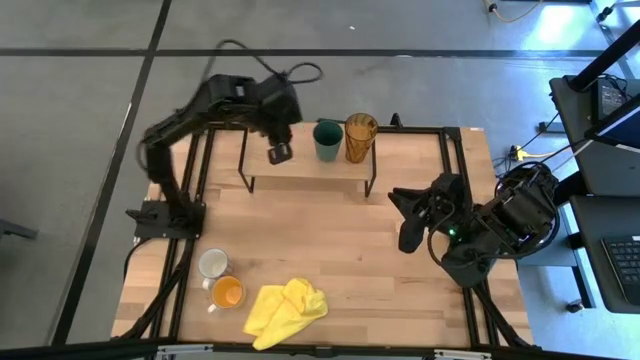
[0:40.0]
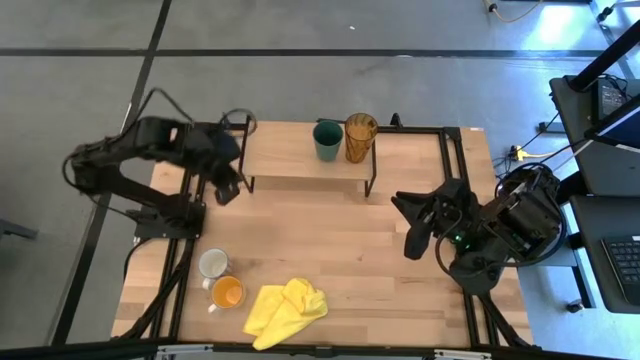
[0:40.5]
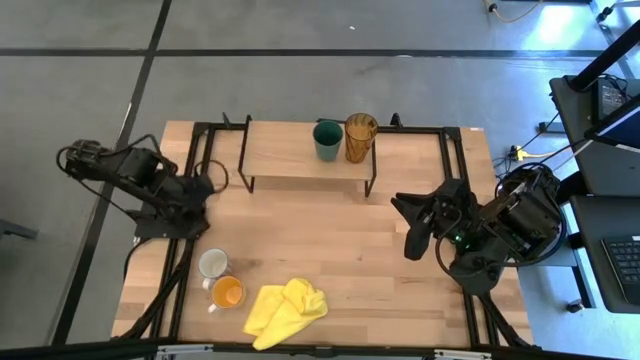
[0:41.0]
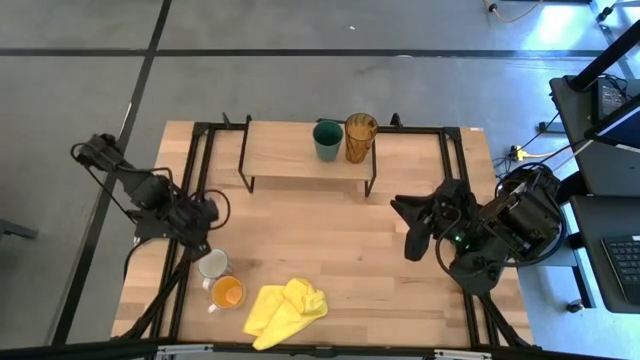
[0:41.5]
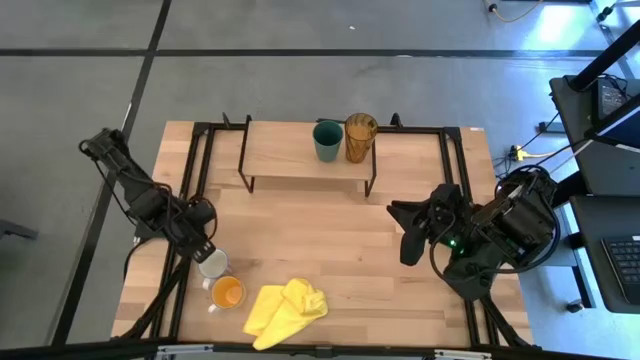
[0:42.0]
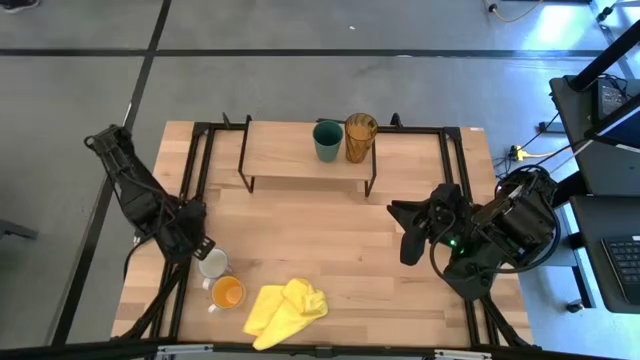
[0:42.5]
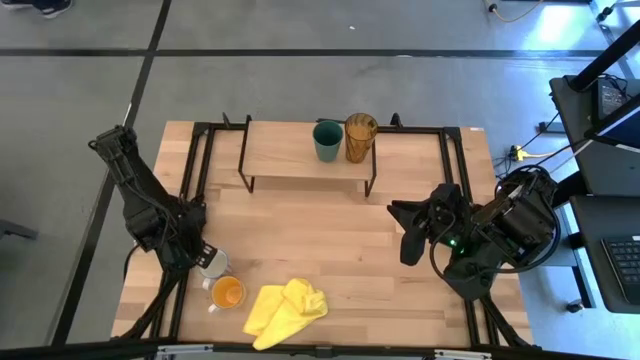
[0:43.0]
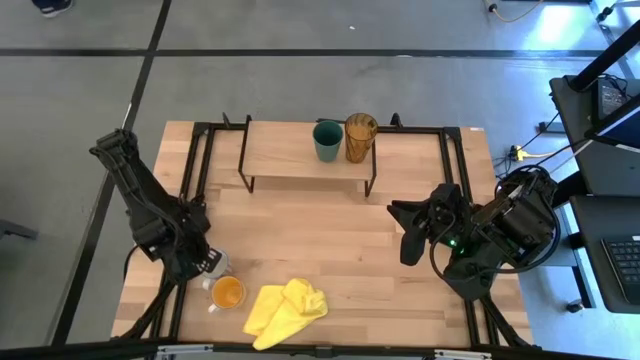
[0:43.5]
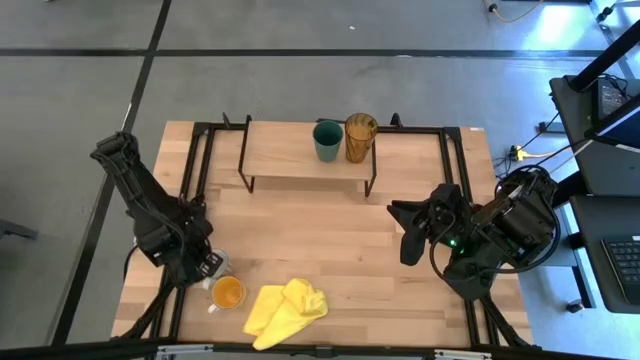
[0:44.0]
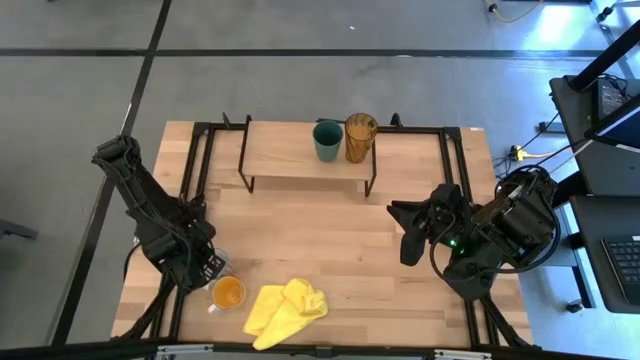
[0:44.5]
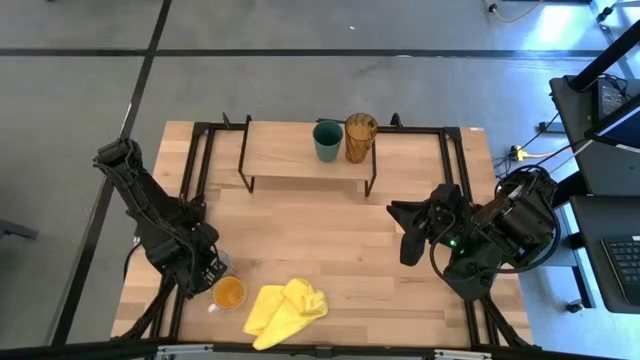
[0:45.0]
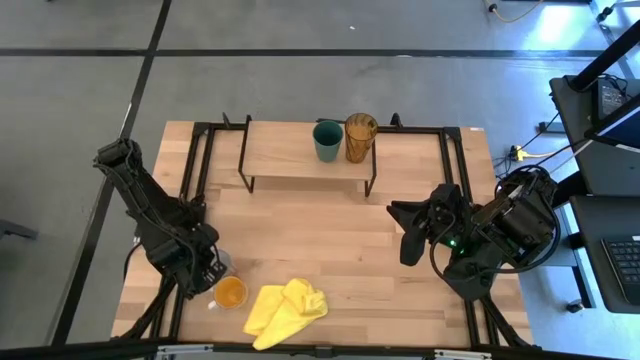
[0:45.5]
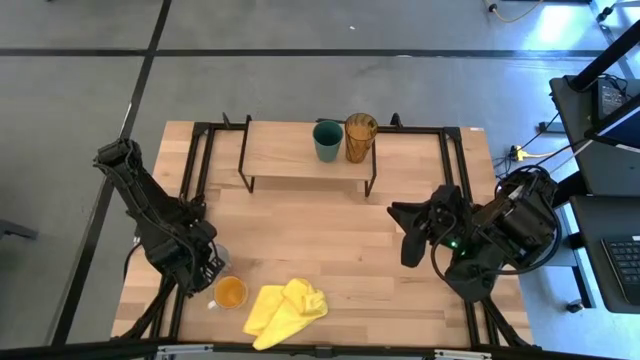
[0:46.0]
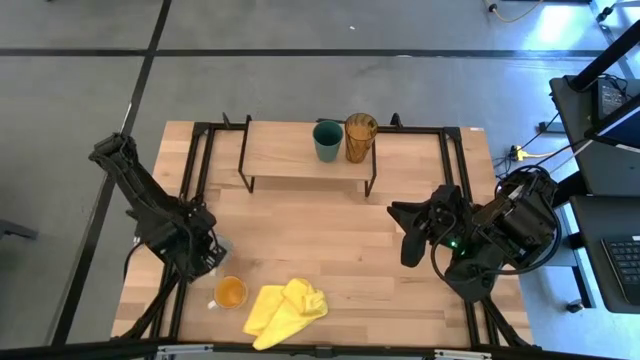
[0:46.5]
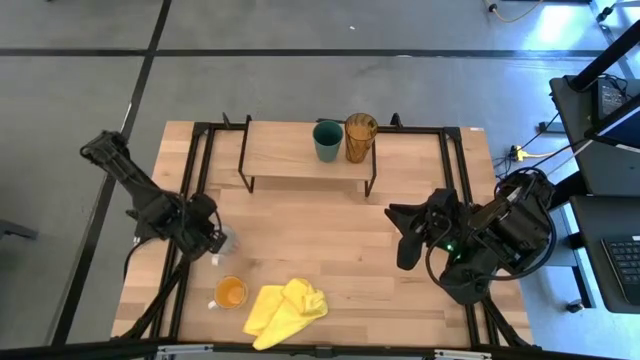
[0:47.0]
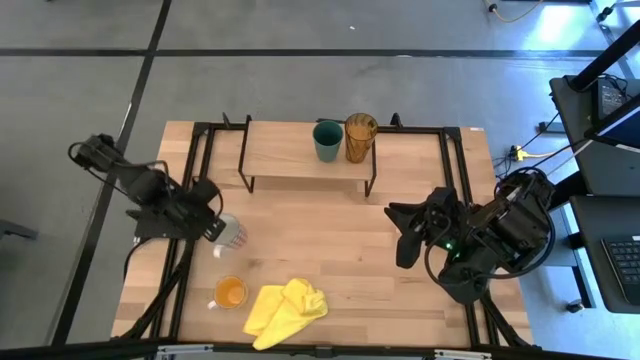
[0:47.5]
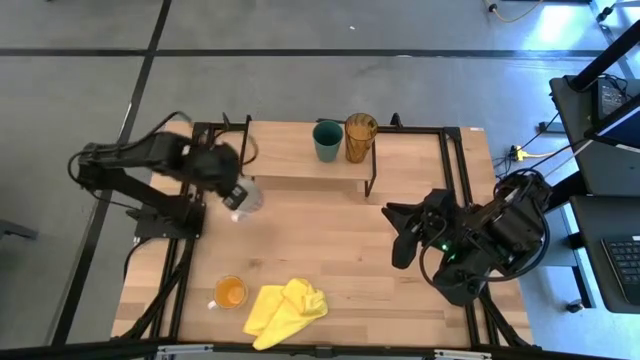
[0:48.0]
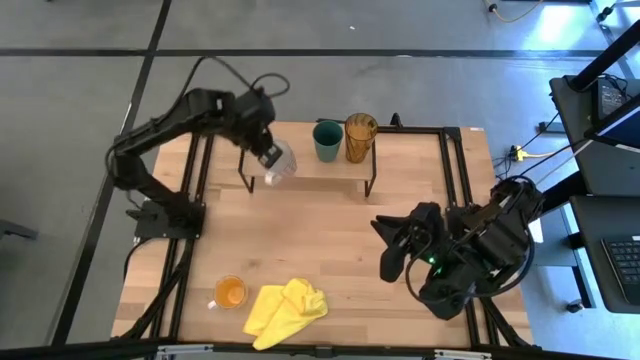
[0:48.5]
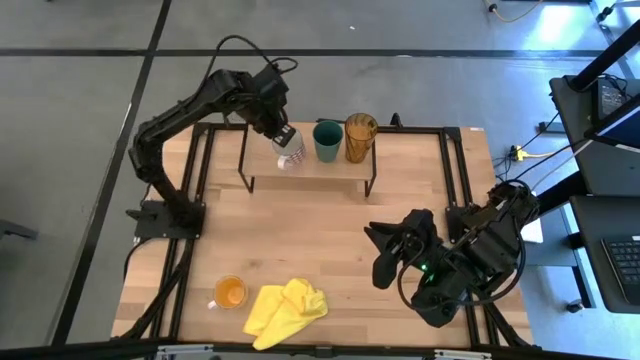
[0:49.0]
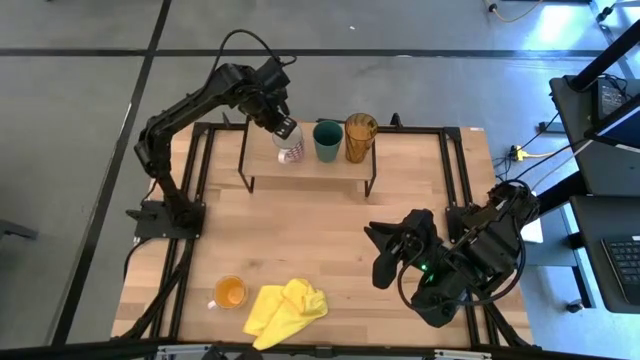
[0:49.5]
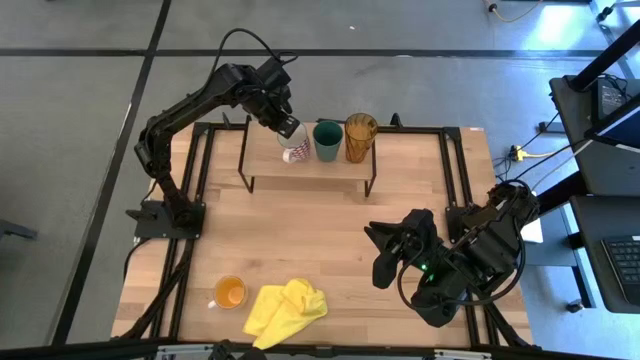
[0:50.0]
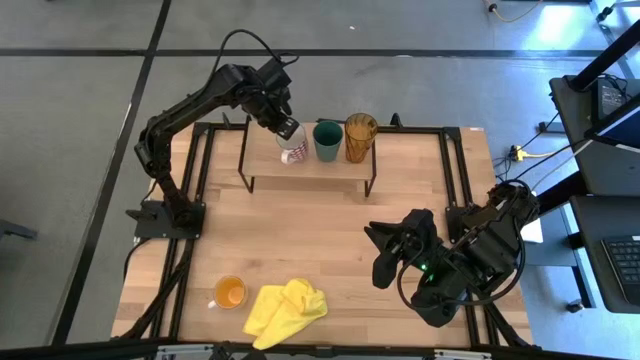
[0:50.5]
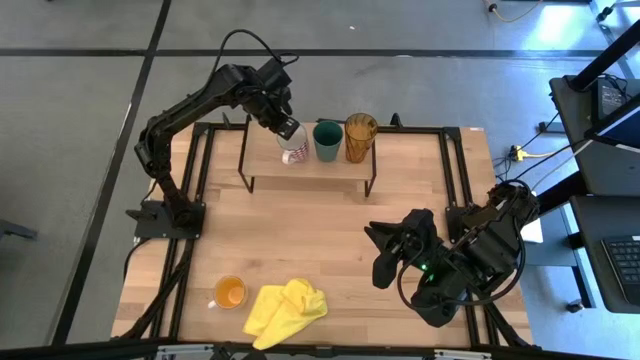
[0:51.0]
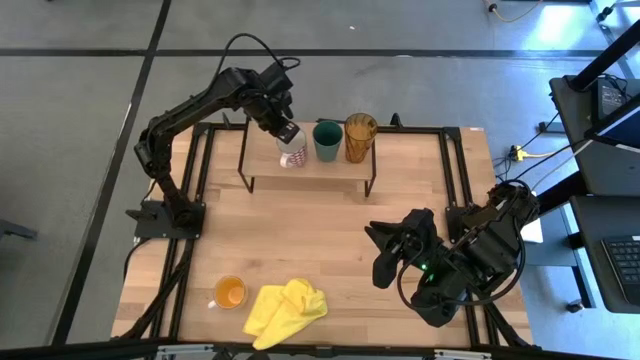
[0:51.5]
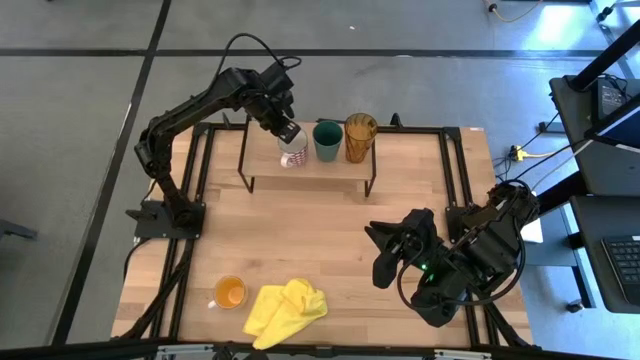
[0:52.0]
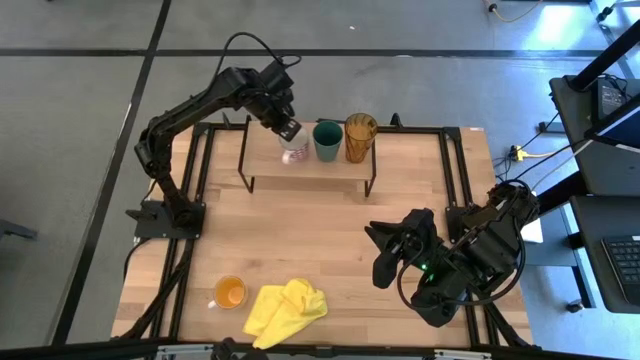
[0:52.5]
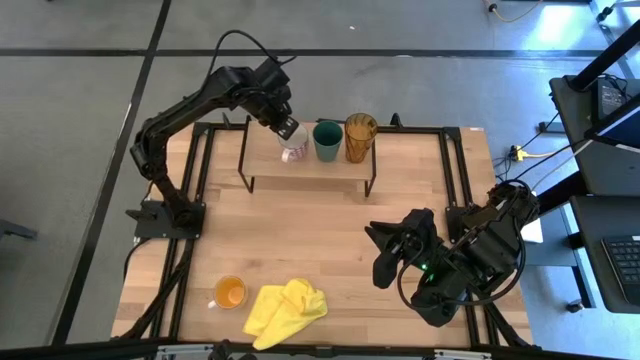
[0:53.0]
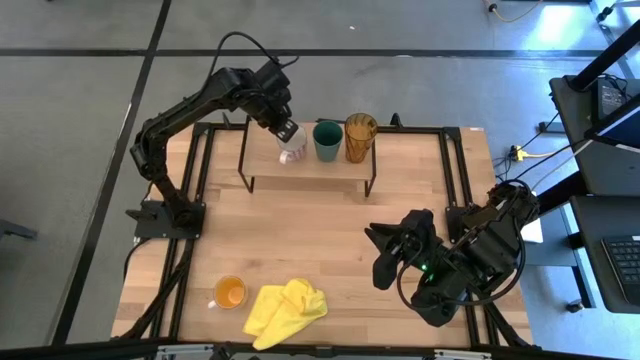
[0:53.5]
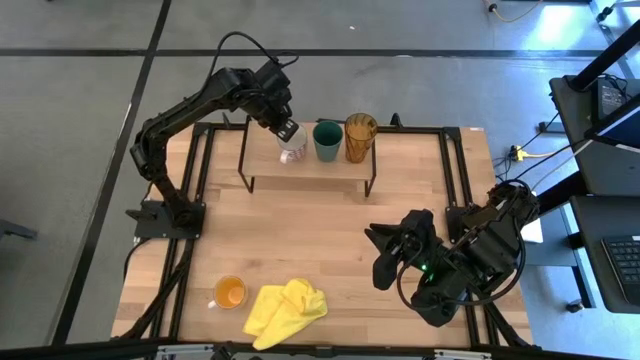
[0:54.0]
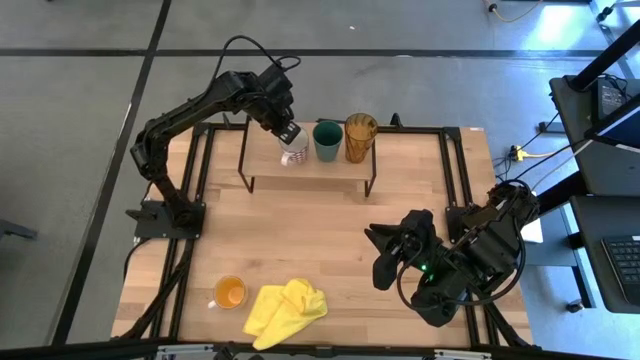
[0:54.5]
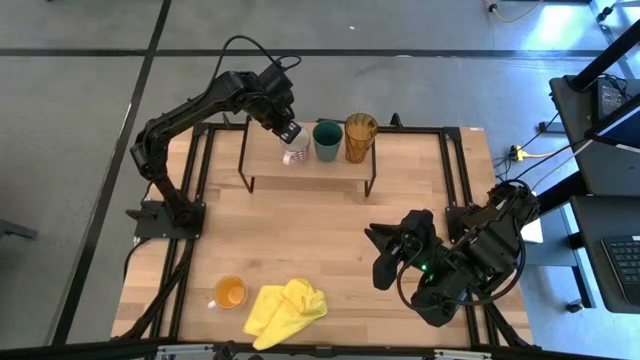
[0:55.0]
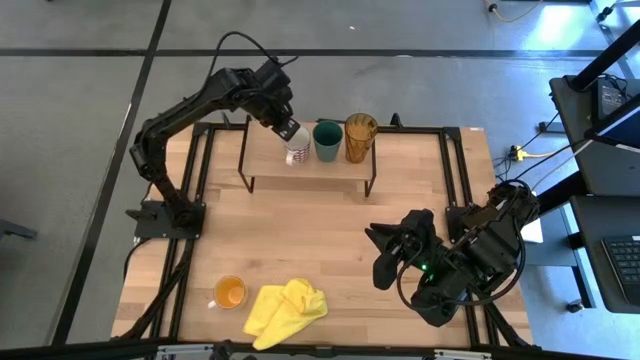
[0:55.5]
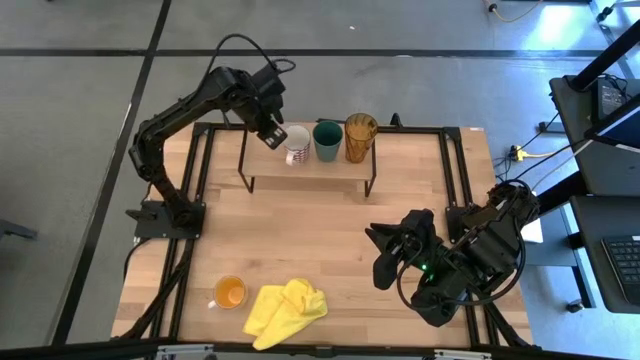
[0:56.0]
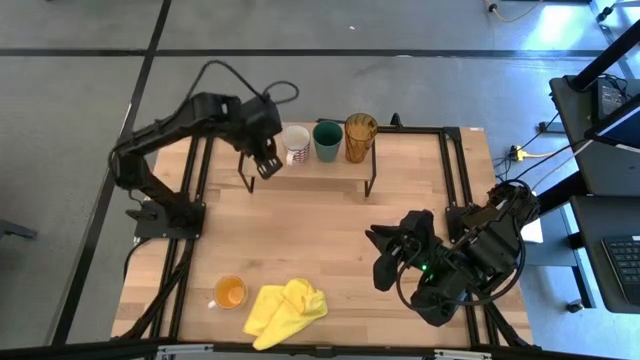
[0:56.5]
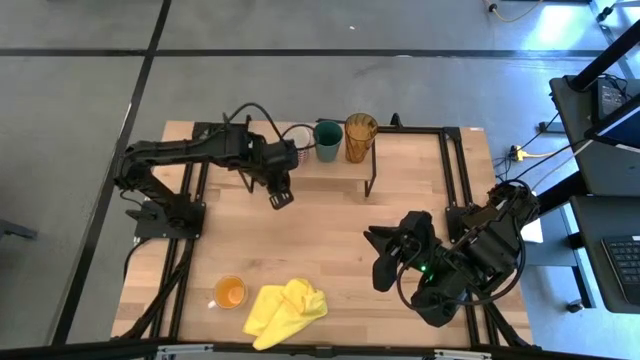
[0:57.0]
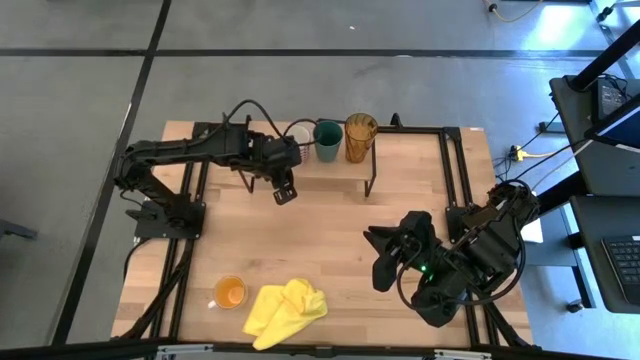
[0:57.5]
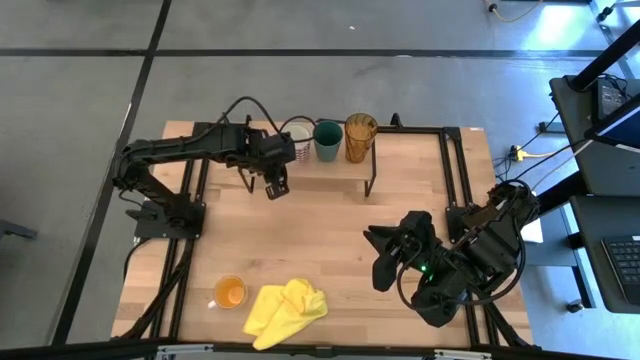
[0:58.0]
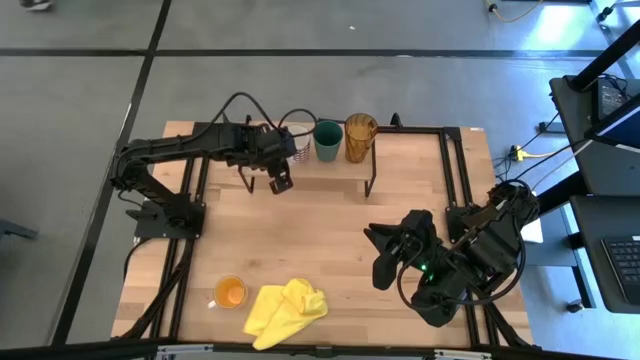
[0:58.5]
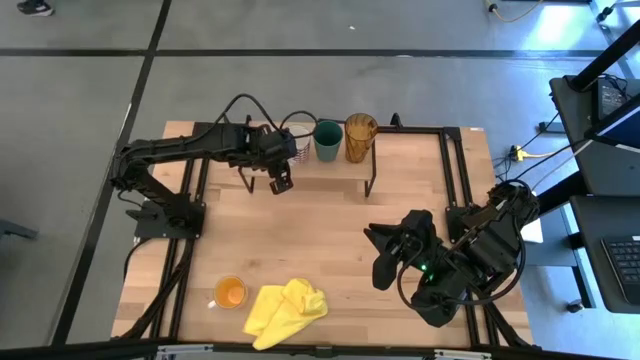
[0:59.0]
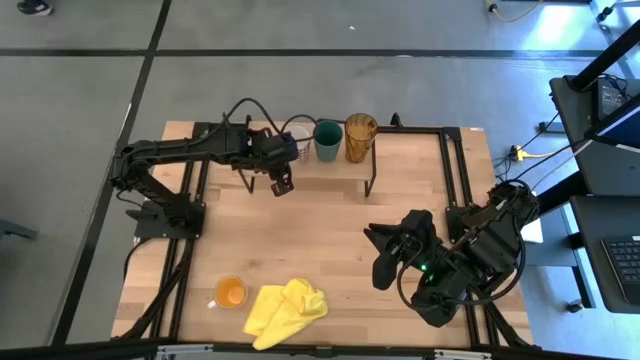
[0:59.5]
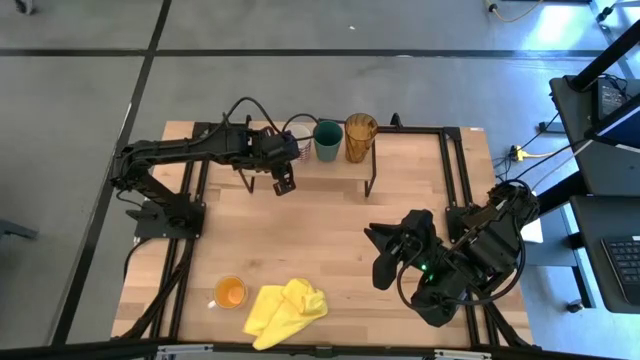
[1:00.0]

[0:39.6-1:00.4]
Task: Stack small to large cups/mugs on shelf
Put the red patterned mug on the shelf
